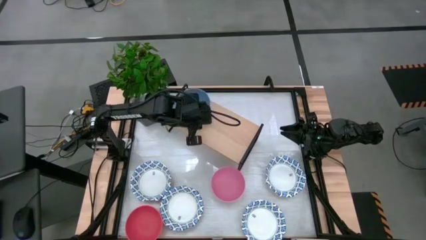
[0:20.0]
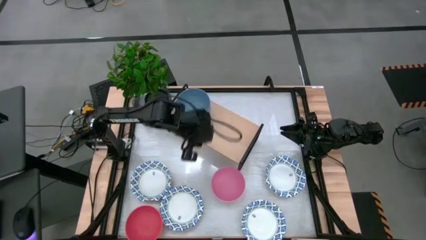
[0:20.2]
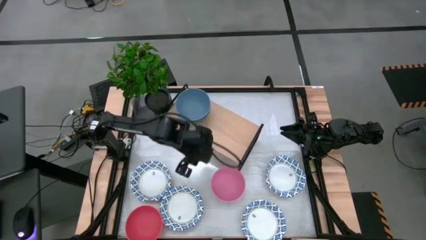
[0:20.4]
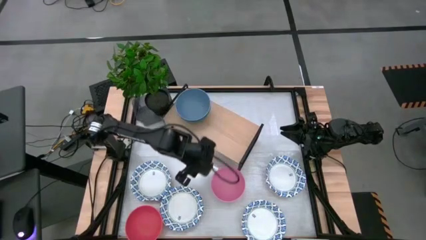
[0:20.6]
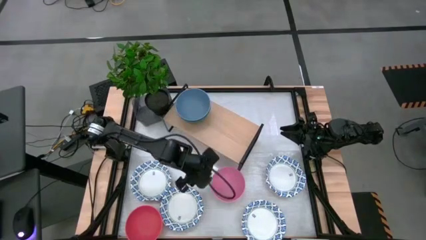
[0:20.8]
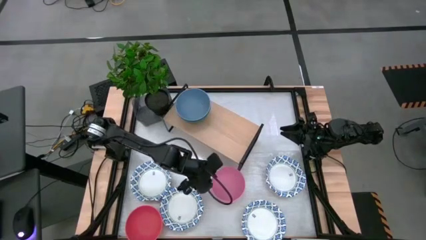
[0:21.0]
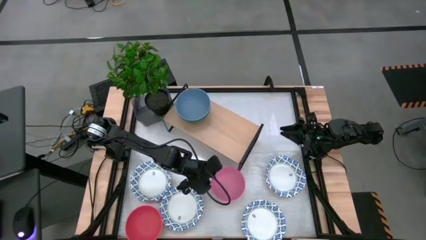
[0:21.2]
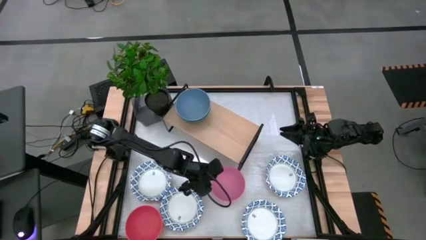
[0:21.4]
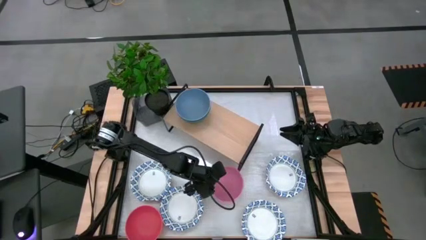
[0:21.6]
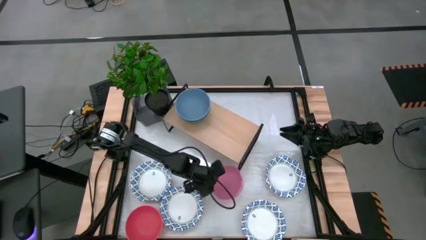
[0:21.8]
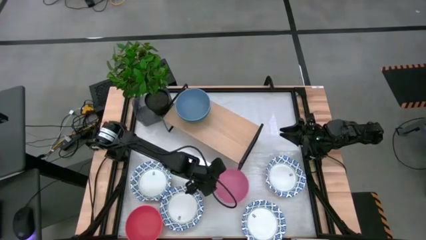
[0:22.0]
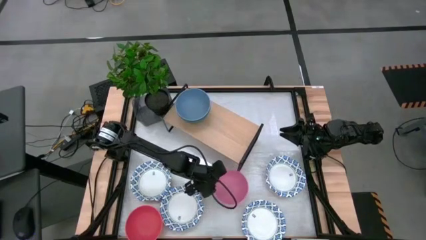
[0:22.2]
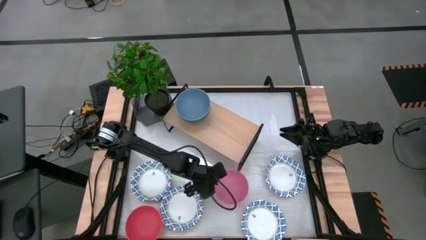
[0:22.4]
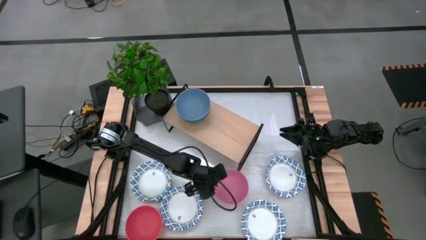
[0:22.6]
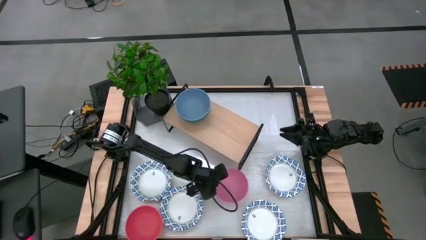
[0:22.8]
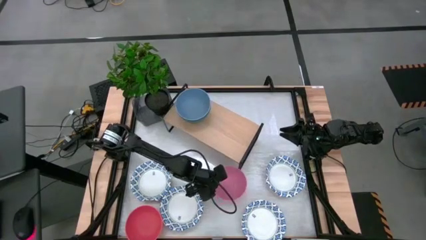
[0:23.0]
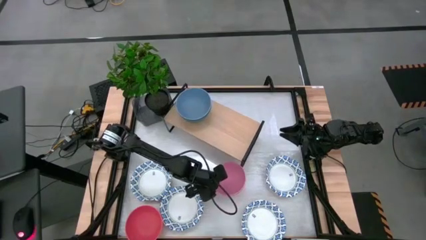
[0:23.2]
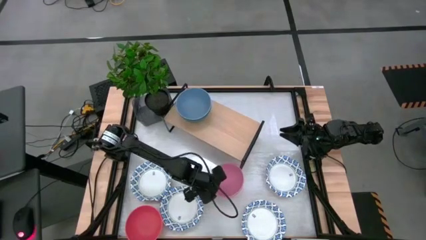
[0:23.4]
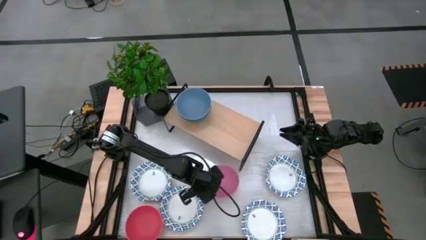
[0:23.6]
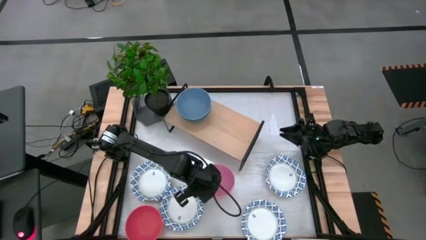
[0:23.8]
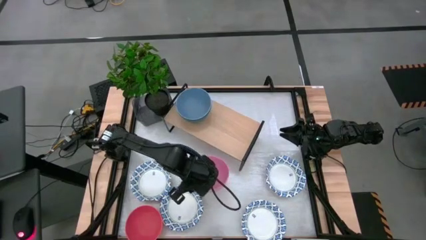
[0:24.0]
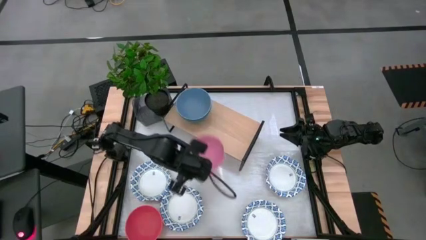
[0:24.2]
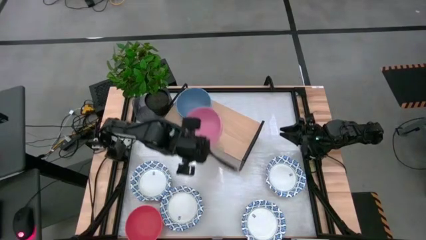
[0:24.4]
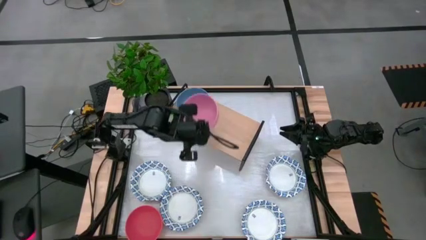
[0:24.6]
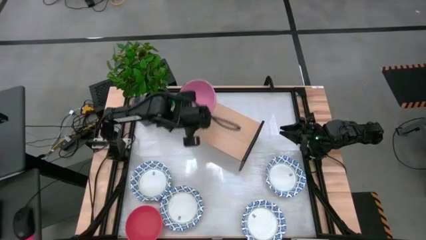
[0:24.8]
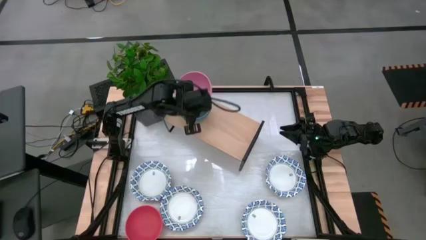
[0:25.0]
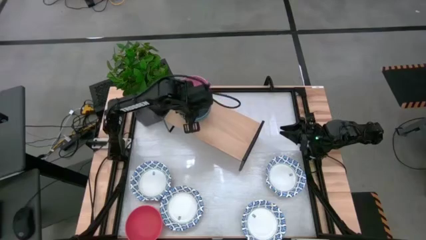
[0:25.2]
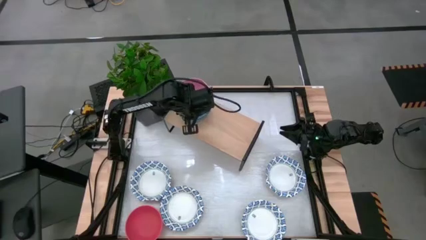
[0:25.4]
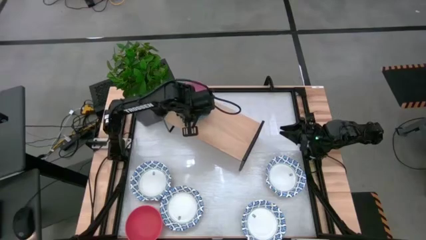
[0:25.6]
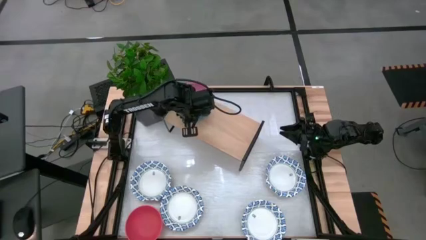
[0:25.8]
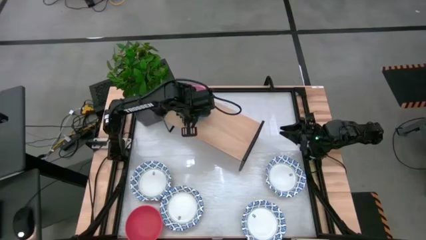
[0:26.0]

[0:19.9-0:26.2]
Task: Place and stack bowls onto a shelf
Stack the pink bowl on top of the blue bowl on the shelf

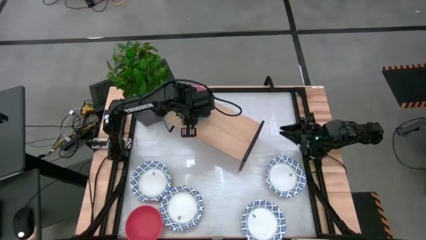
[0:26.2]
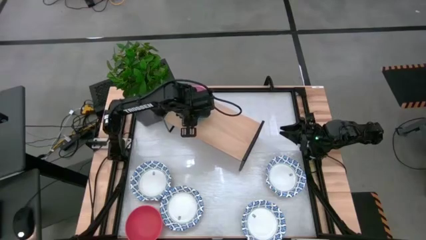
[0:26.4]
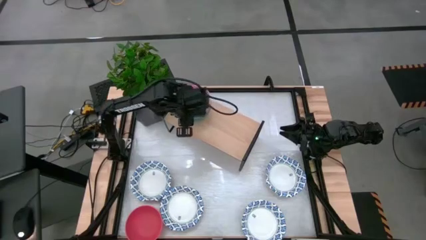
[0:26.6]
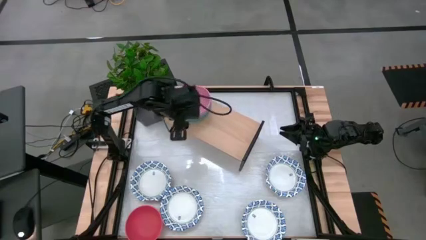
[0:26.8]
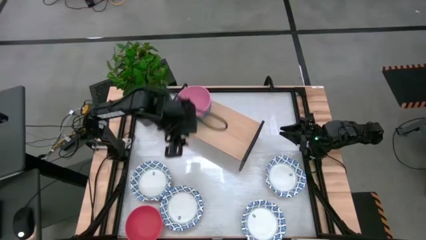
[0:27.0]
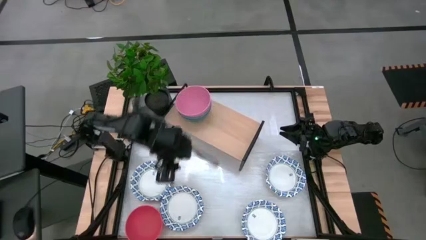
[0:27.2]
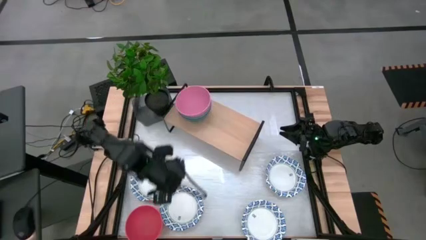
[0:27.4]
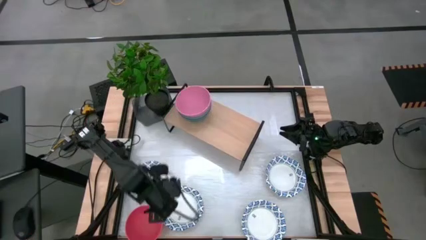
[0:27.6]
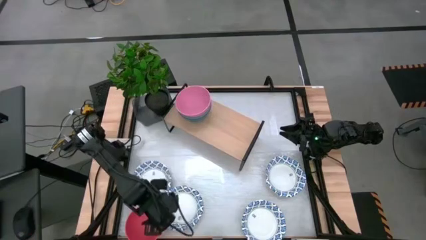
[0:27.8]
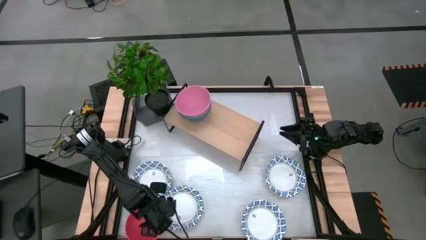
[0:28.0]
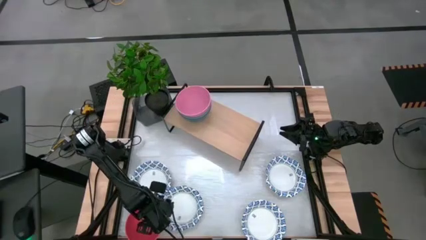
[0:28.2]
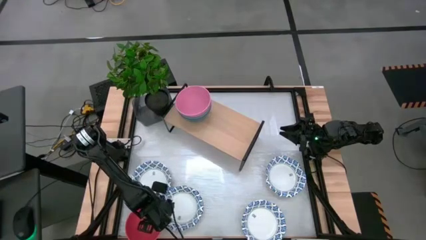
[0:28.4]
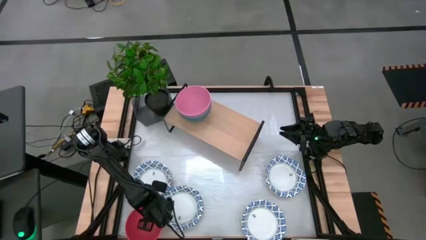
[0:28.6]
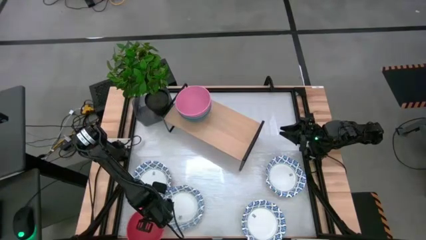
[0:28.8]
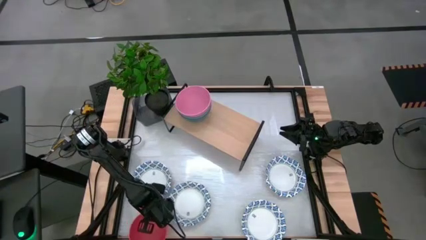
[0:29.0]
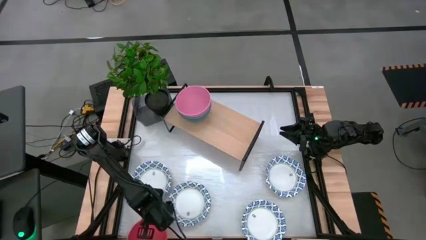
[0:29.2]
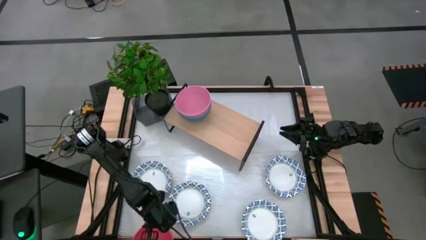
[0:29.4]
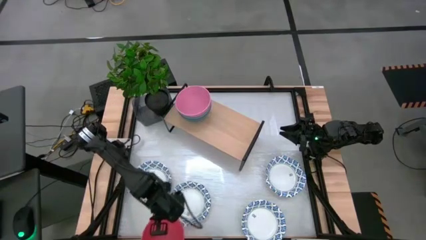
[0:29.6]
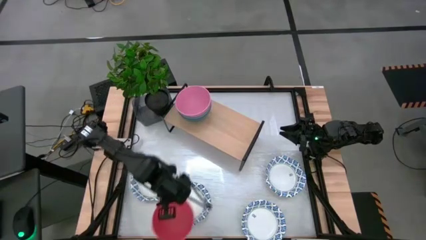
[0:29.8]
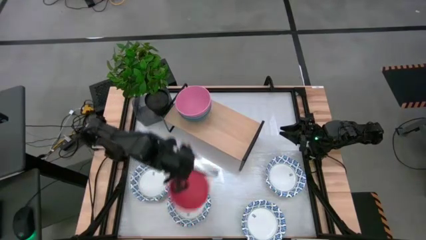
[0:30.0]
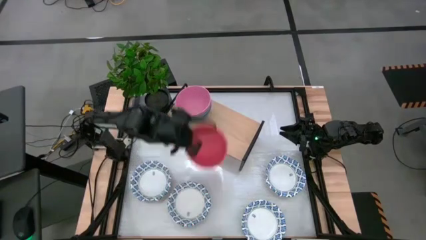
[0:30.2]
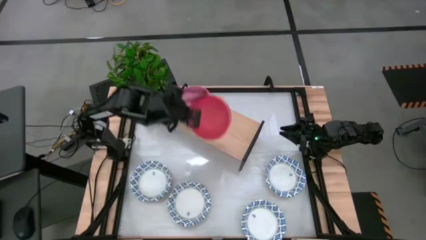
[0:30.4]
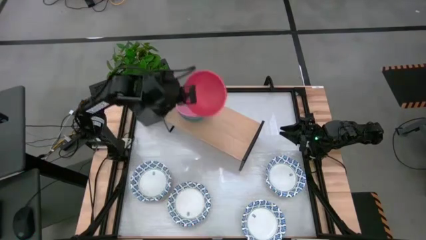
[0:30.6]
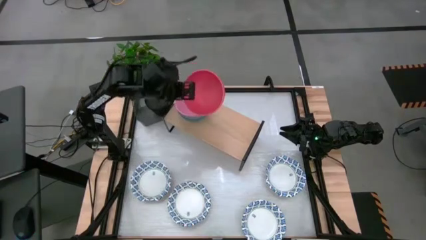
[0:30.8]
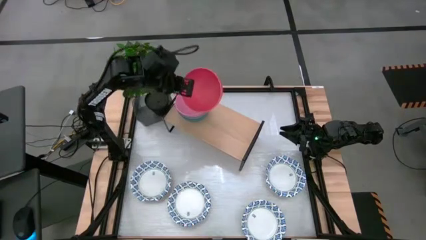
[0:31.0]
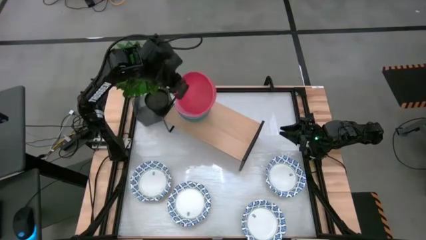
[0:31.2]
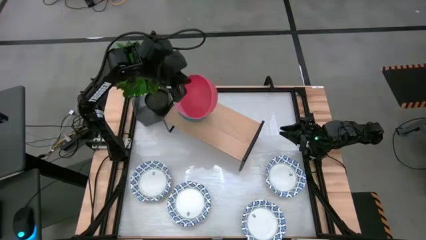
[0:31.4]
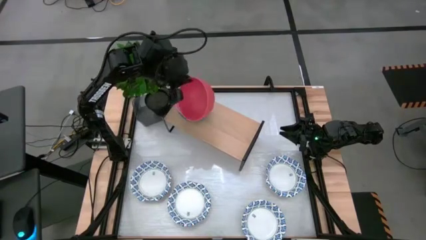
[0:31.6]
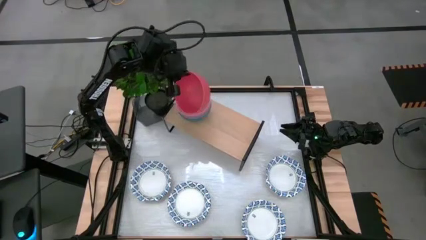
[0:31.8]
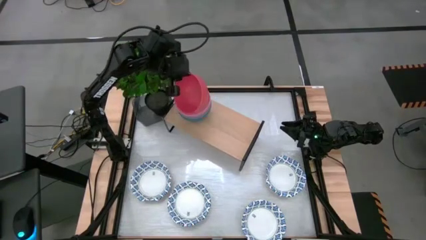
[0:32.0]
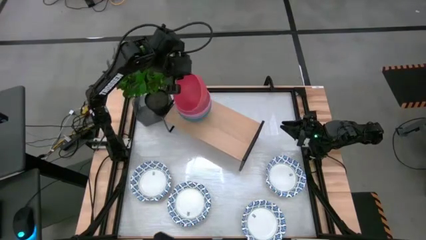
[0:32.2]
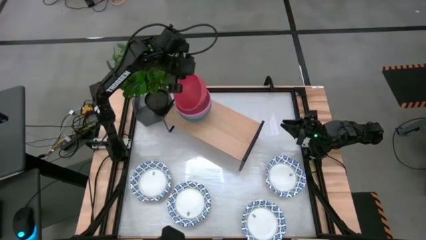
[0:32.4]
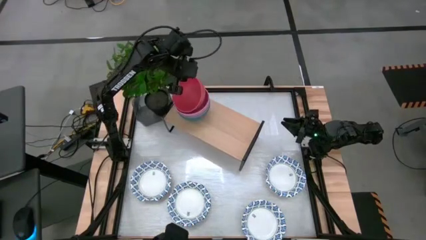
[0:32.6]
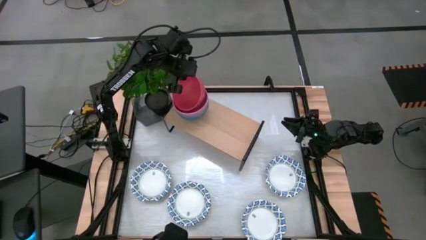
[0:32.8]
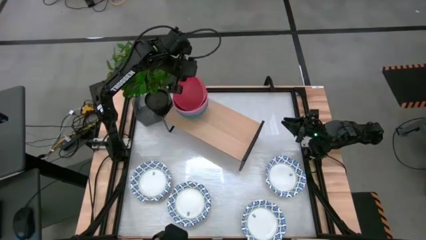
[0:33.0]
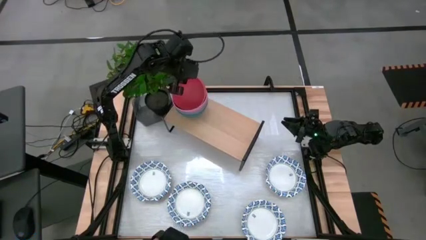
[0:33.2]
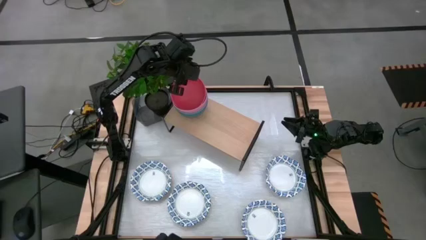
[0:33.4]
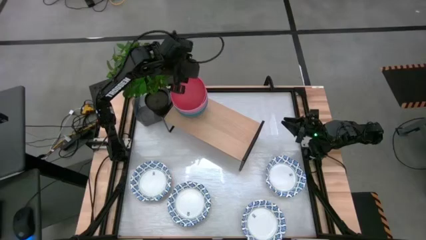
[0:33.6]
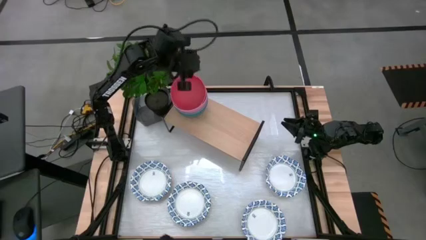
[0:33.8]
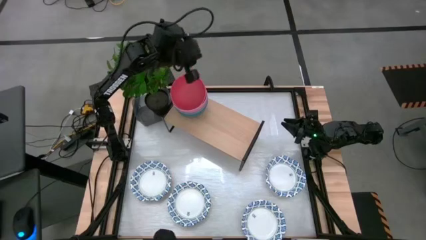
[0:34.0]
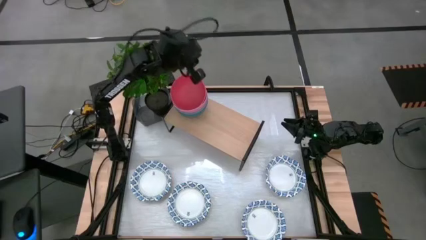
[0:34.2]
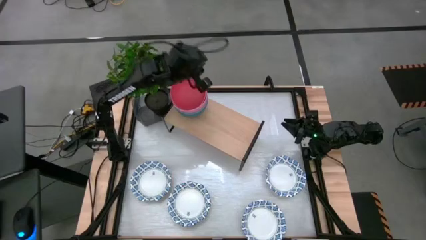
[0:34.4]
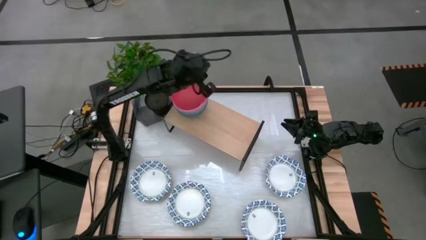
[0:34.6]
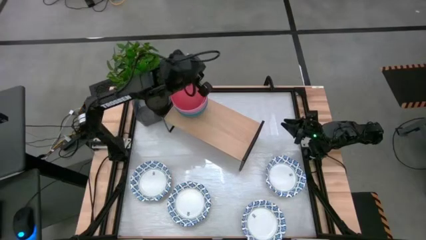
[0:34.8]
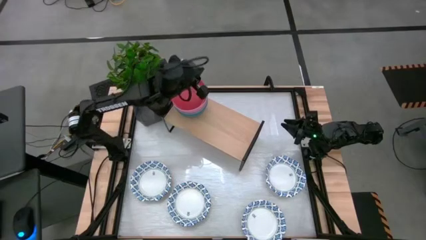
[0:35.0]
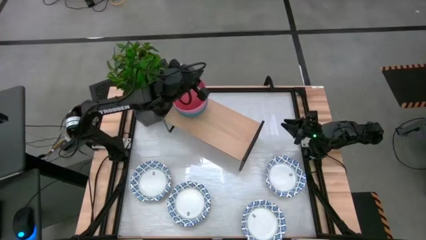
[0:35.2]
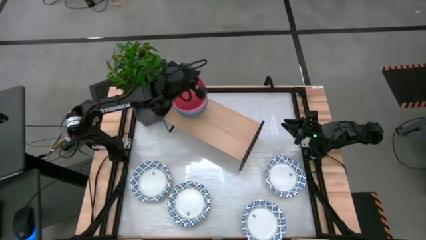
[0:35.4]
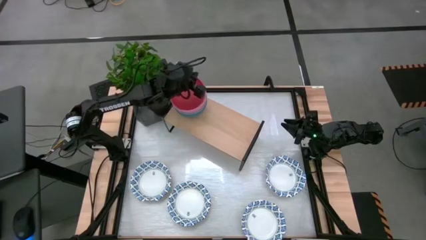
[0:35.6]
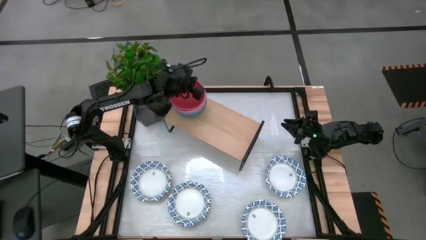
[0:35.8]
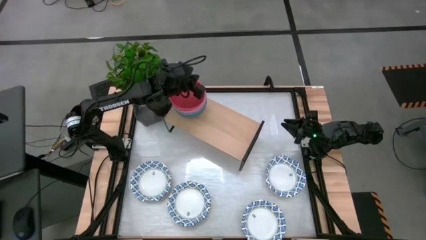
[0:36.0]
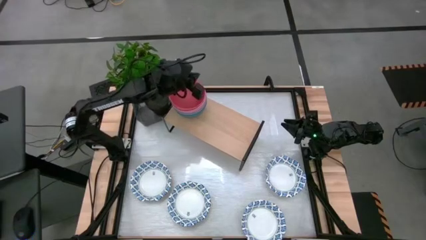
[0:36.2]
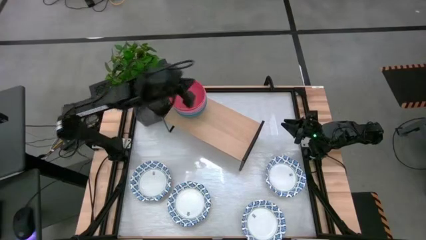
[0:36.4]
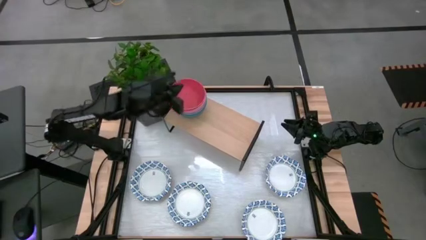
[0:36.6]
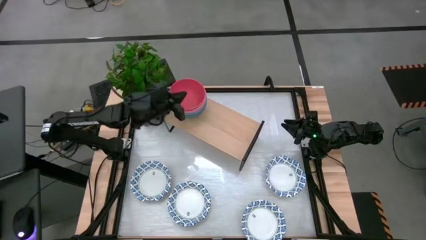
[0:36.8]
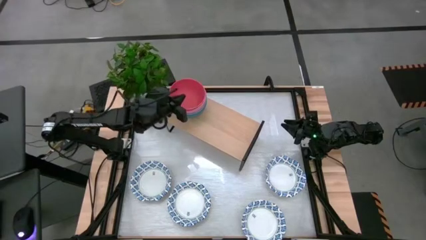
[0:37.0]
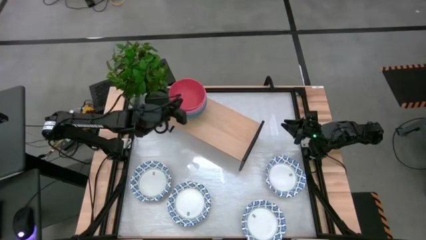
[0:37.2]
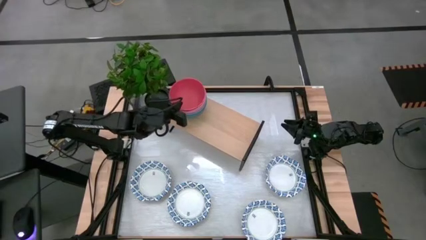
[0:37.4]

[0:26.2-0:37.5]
Stack the orange bowl on top of the pink bowl on the shelf
